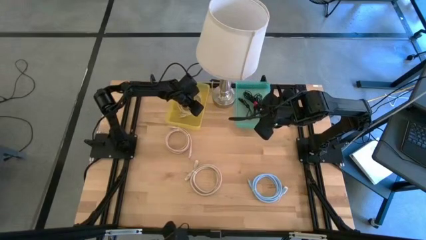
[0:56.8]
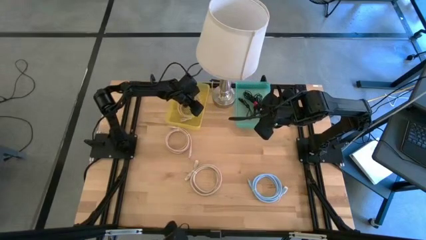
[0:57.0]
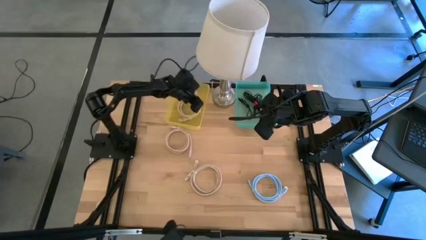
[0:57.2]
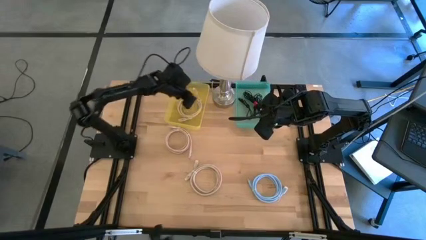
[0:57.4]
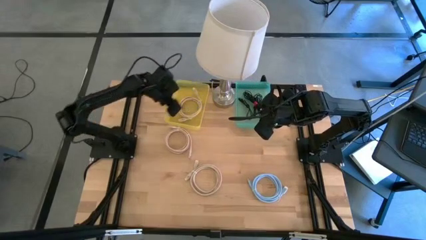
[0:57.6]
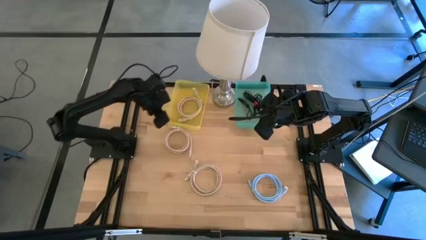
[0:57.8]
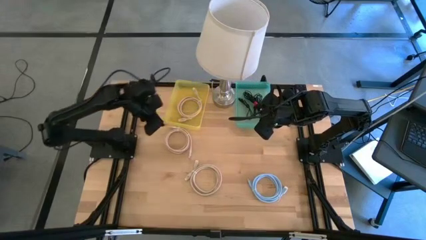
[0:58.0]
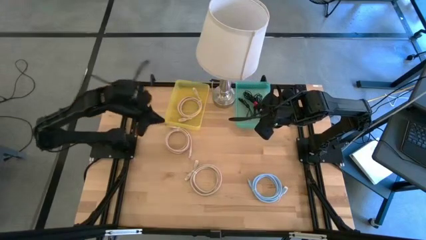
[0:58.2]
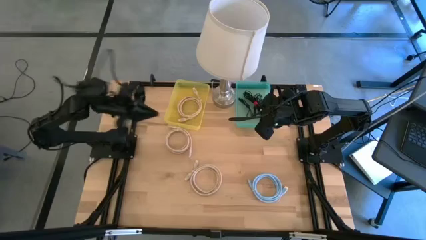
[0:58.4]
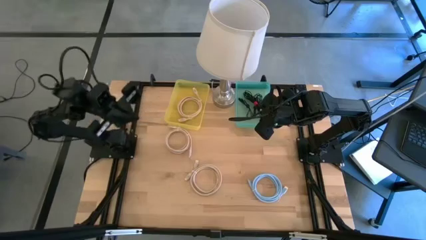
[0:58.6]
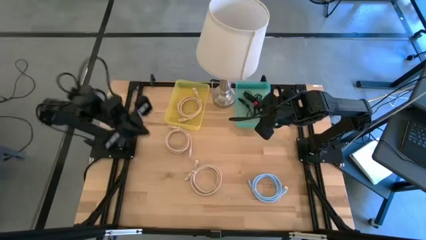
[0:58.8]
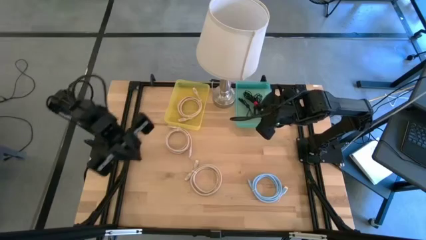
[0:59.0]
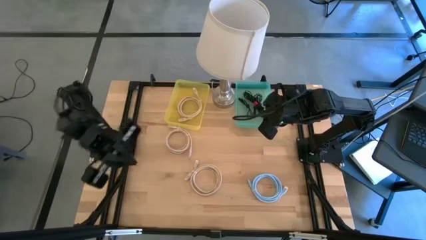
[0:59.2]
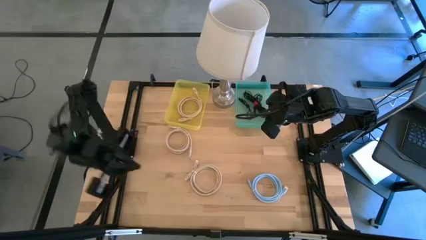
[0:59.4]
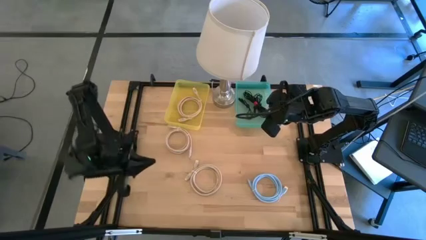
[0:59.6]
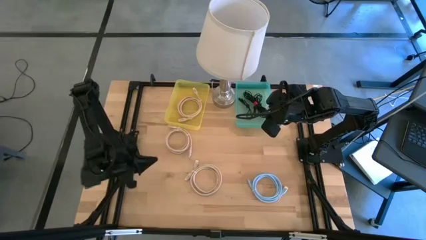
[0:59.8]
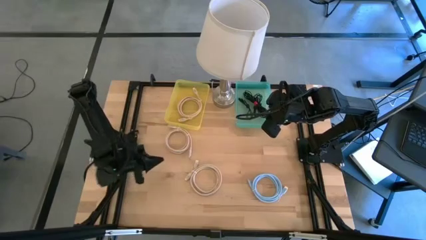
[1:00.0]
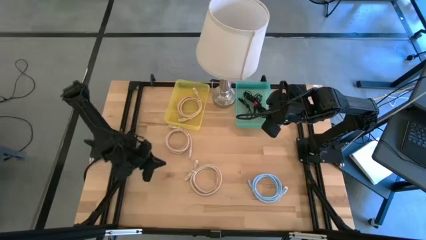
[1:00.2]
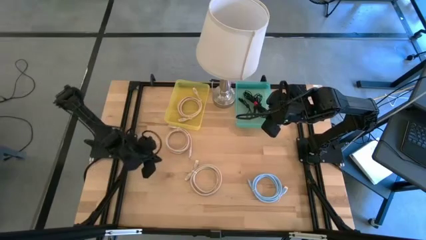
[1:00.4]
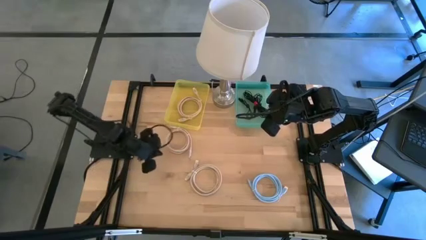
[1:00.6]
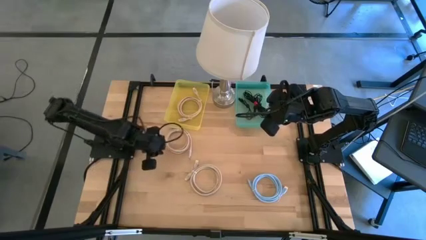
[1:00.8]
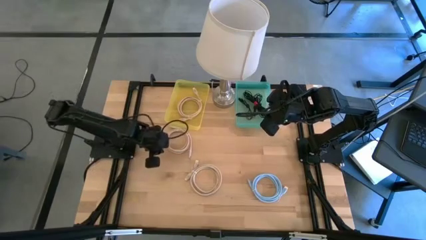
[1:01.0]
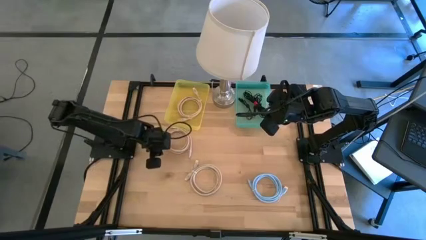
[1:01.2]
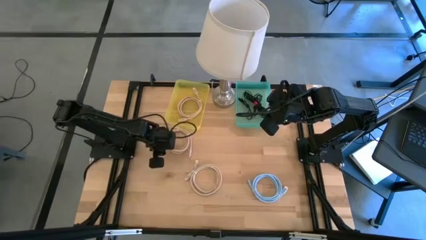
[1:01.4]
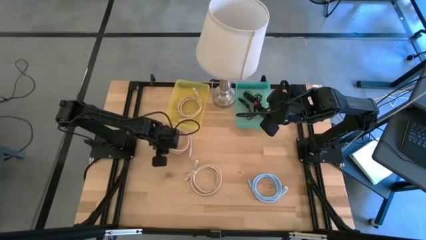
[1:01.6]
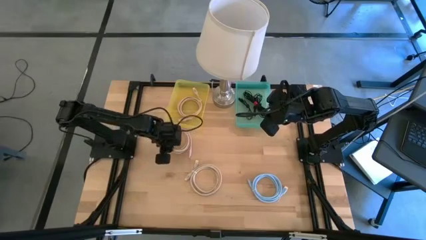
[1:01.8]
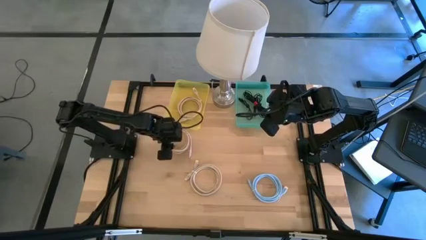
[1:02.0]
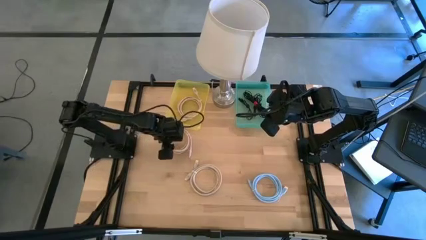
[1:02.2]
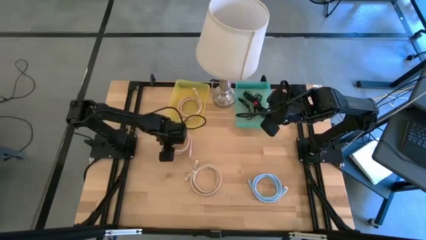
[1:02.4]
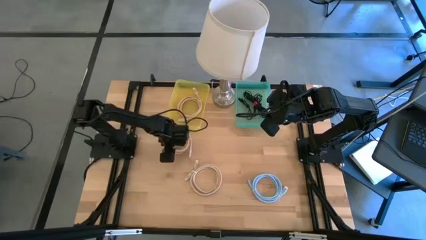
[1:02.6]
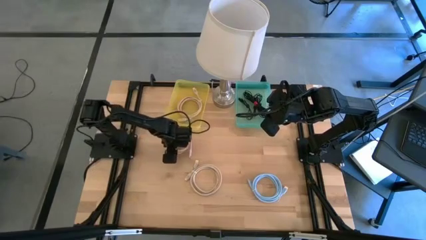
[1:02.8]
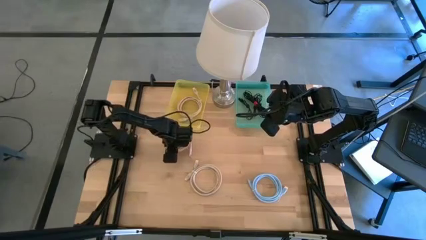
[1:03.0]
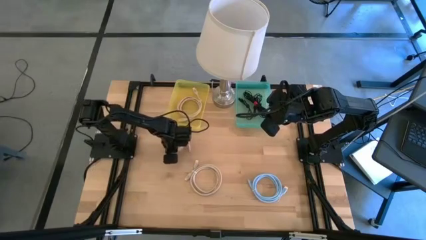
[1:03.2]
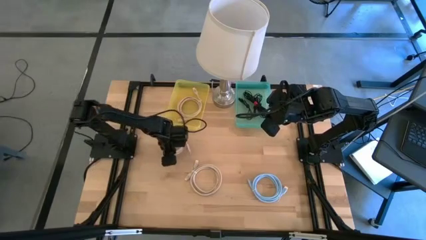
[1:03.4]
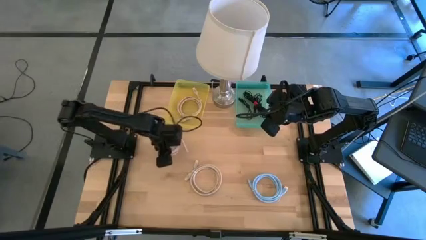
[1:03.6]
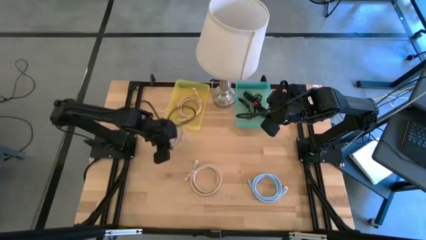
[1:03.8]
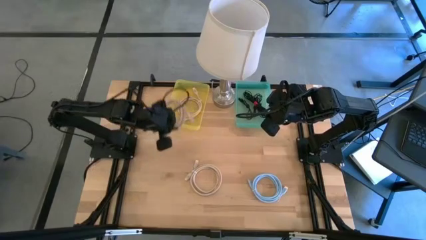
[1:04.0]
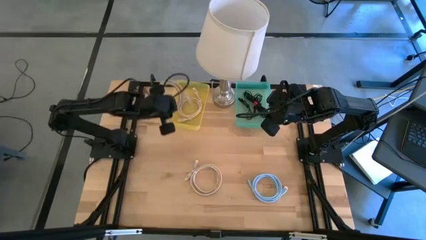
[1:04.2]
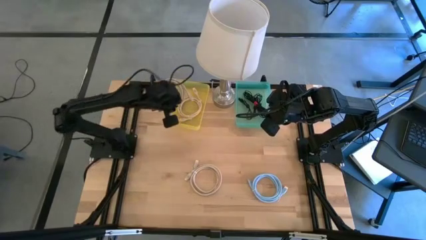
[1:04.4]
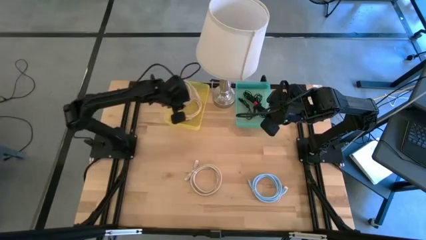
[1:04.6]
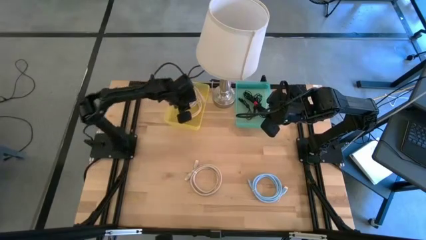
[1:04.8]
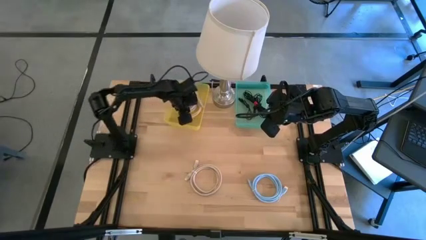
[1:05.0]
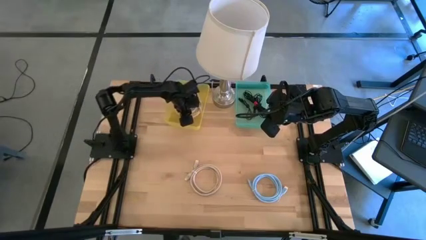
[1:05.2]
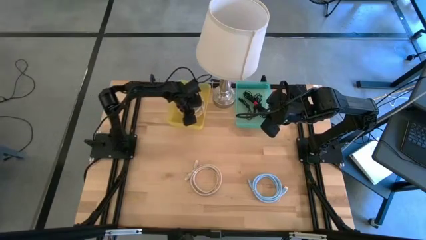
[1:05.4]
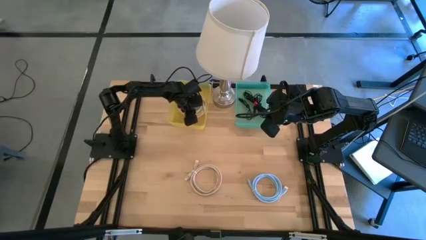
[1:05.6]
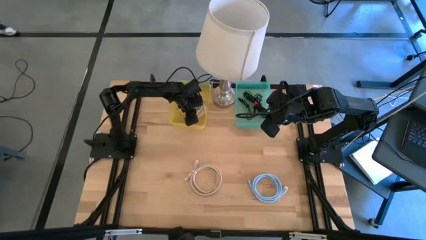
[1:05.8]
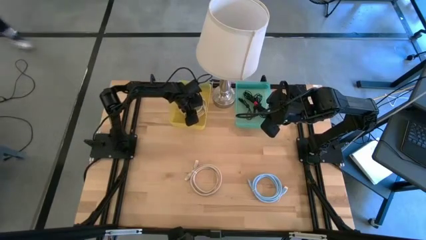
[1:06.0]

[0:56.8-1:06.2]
Put the light brown HDMI cable into the yellow bin

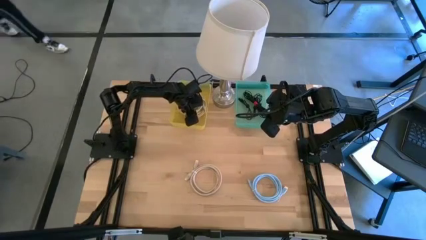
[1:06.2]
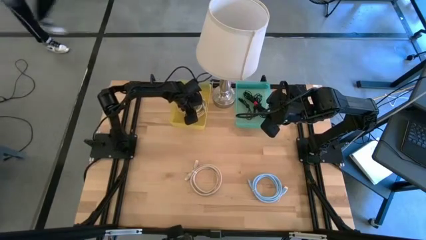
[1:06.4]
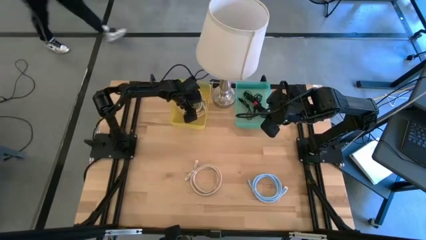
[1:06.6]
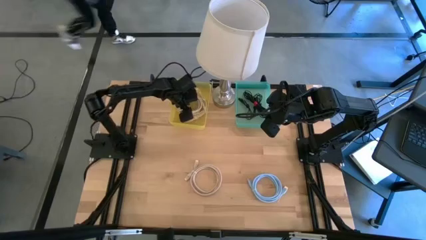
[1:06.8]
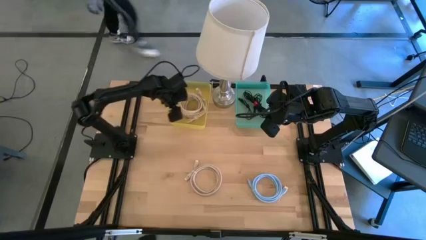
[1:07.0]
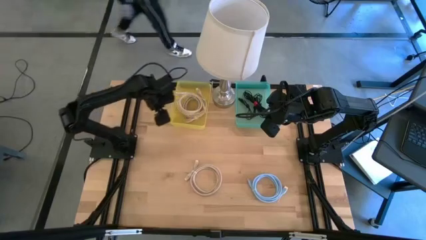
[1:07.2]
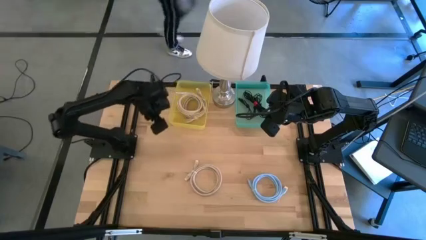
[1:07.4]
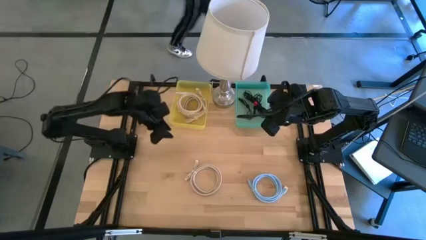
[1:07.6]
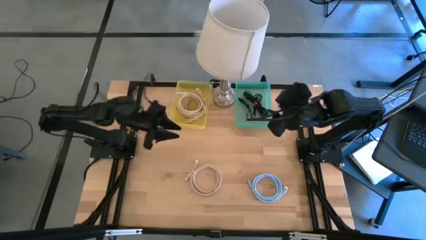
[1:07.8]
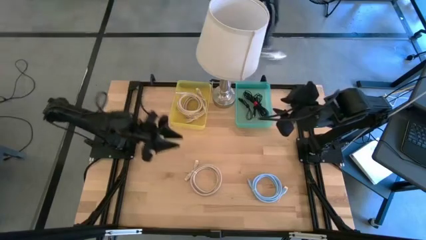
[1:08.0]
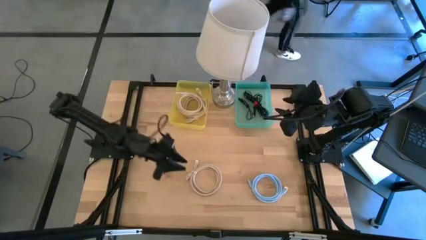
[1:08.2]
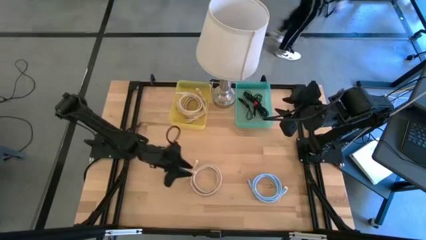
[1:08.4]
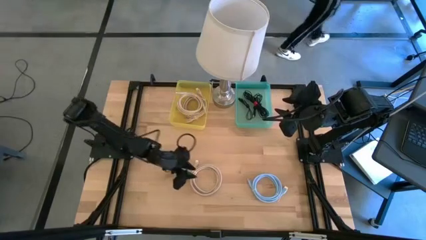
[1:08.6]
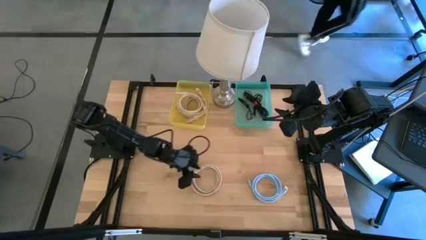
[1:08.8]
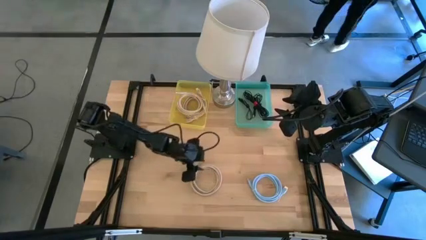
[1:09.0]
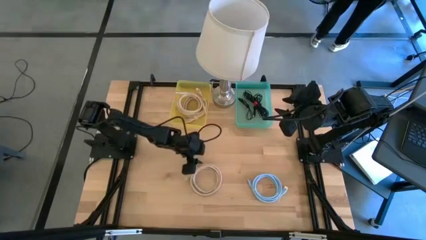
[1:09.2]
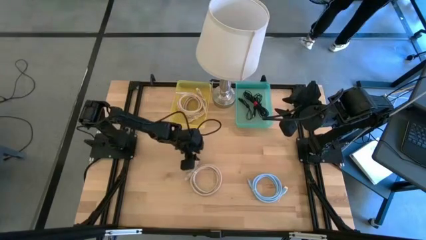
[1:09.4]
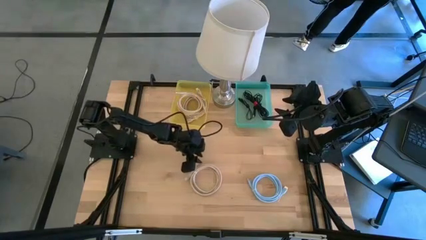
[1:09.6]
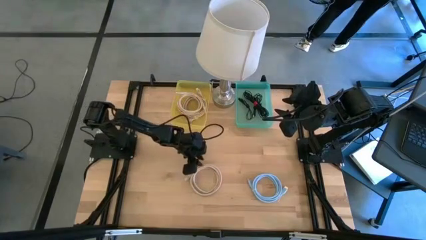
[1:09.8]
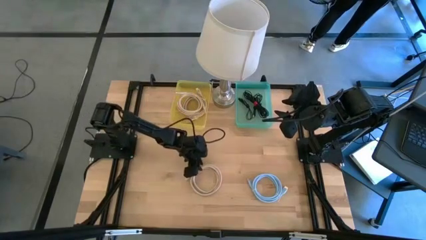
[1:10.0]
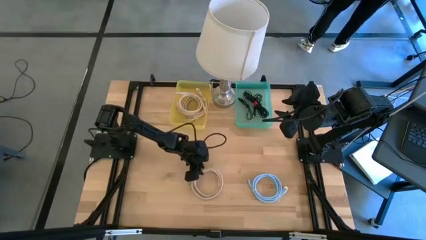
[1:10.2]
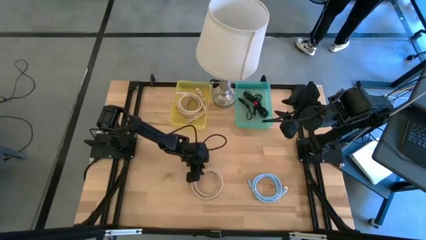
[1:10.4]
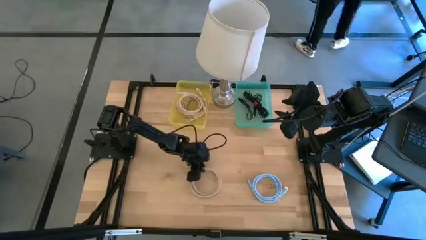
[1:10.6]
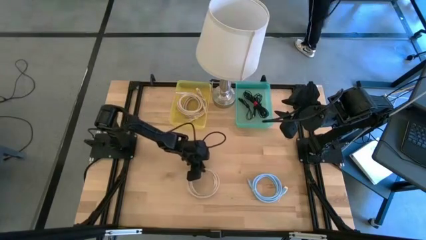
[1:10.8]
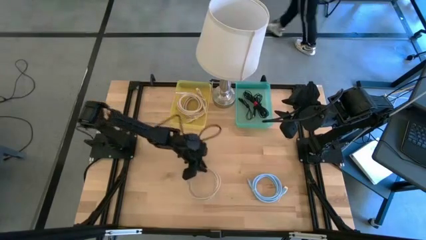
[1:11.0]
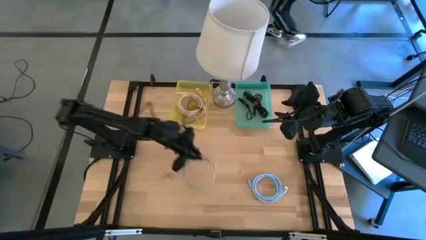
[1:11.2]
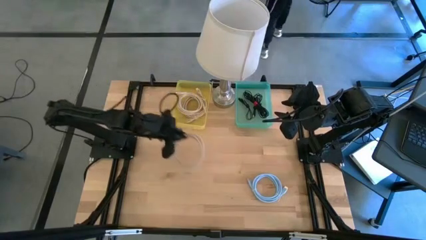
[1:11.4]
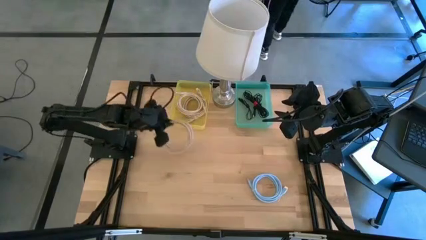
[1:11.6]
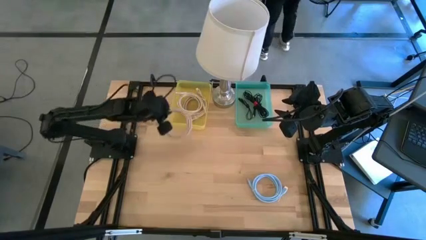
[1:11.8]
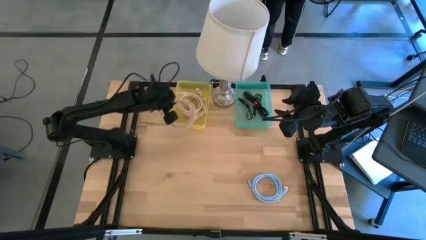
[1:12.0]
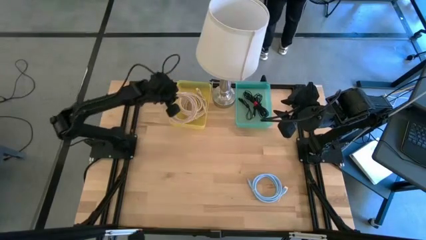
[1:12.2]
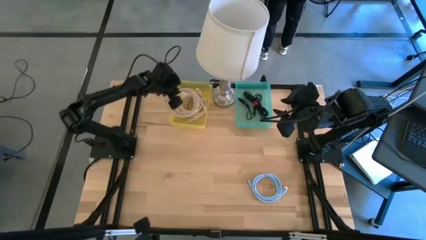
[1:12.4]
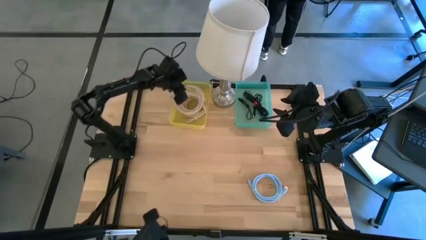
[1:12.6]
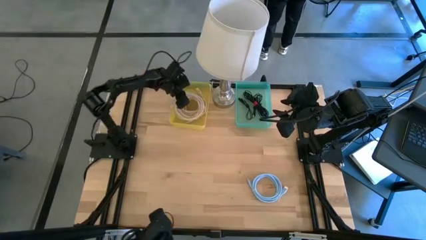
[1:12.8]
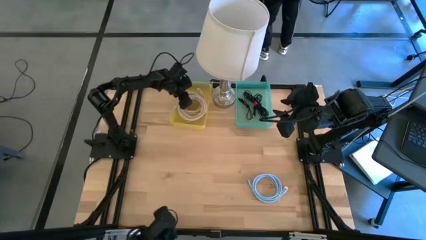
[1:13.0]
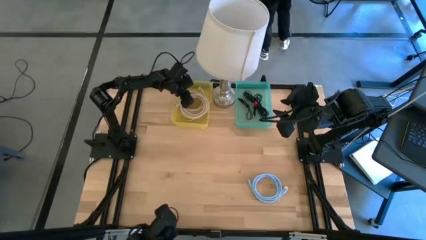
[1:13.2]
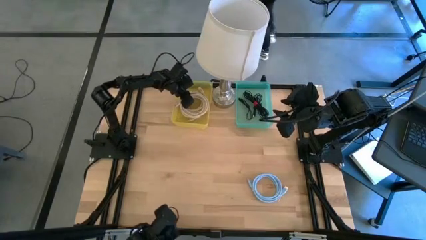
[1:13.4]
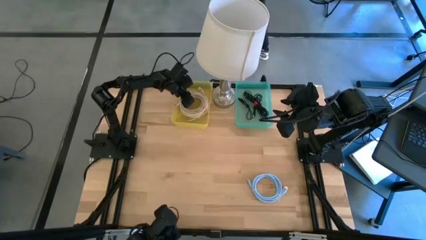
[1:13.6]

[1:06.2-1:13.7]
Put the light brown HDMI cable into the yellow bin
